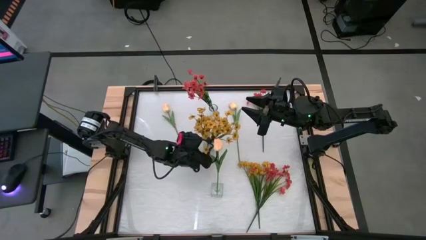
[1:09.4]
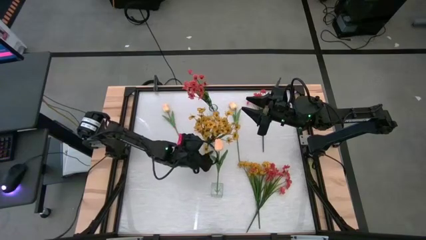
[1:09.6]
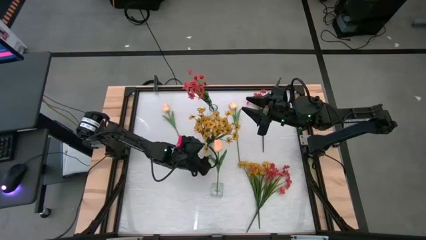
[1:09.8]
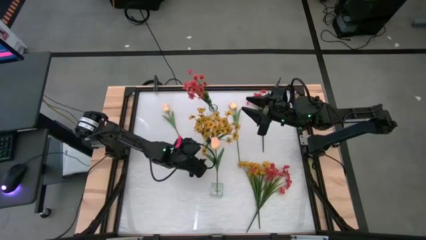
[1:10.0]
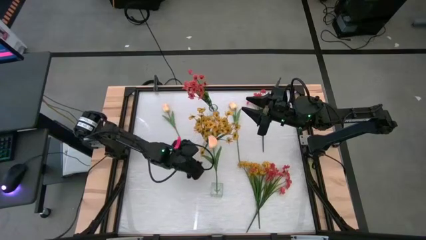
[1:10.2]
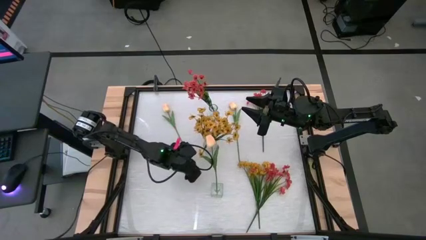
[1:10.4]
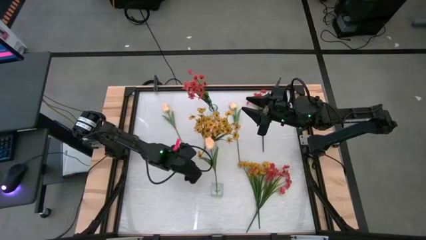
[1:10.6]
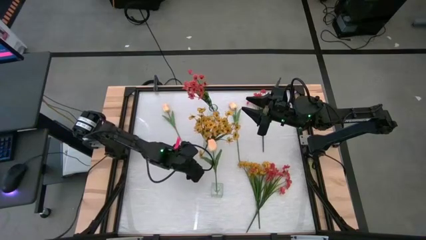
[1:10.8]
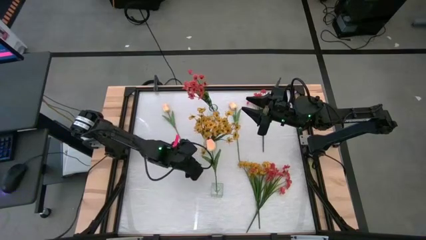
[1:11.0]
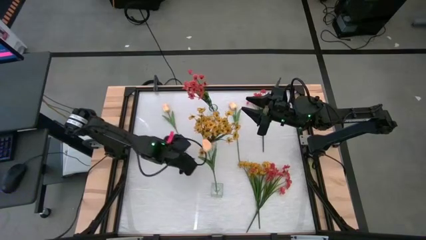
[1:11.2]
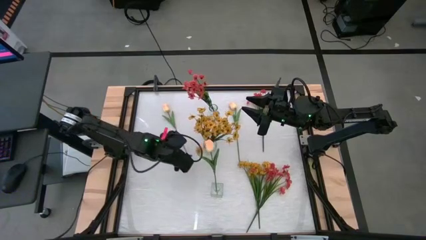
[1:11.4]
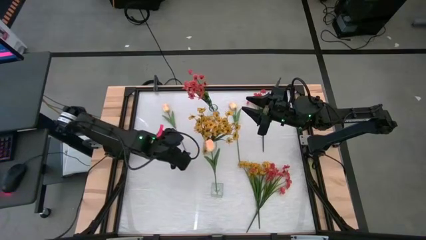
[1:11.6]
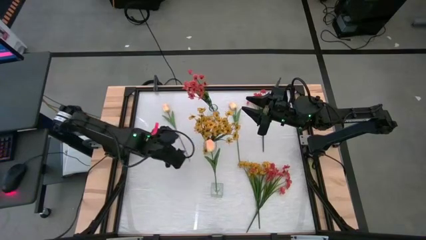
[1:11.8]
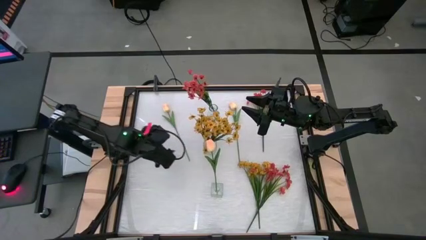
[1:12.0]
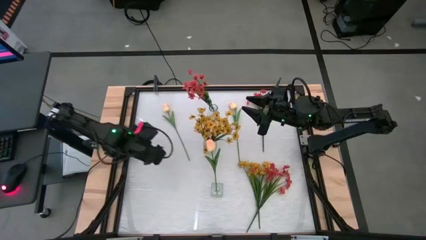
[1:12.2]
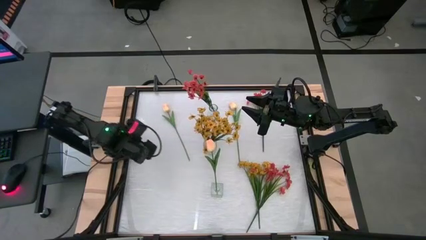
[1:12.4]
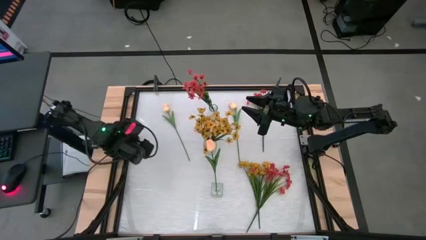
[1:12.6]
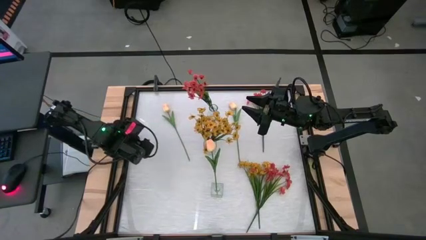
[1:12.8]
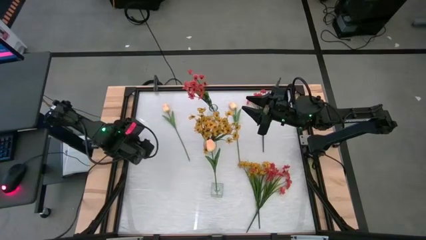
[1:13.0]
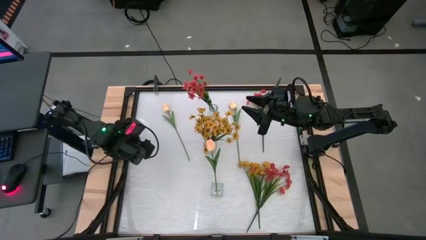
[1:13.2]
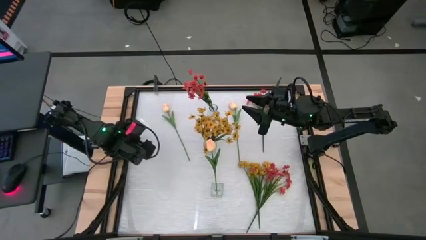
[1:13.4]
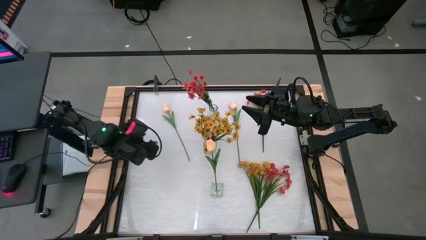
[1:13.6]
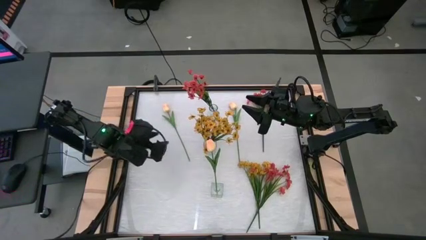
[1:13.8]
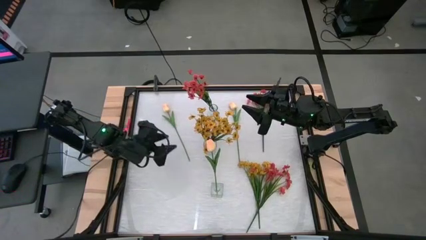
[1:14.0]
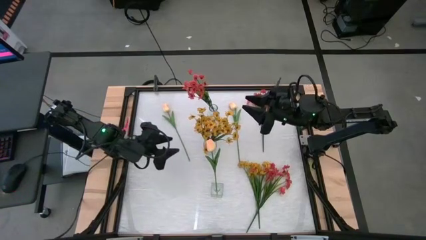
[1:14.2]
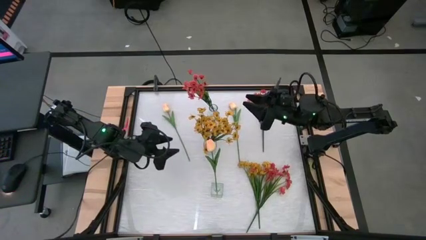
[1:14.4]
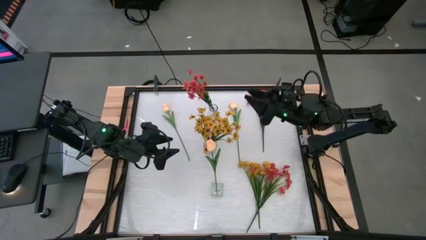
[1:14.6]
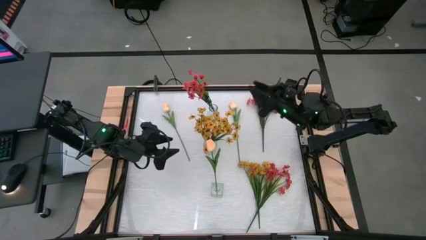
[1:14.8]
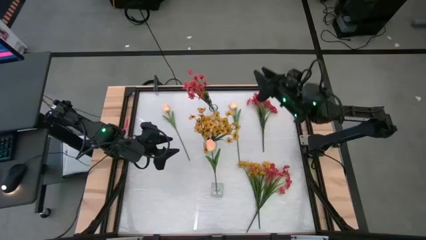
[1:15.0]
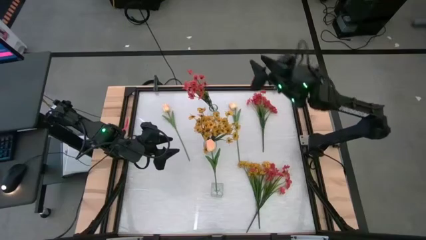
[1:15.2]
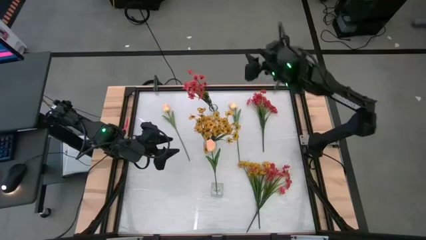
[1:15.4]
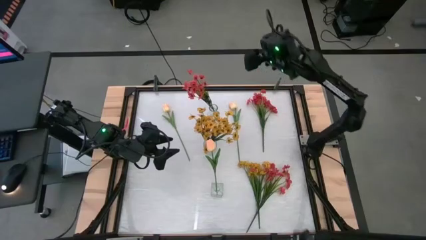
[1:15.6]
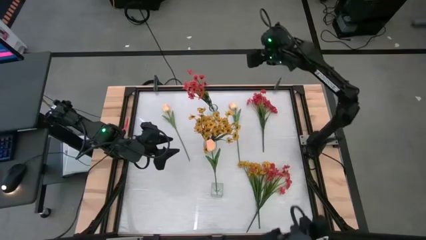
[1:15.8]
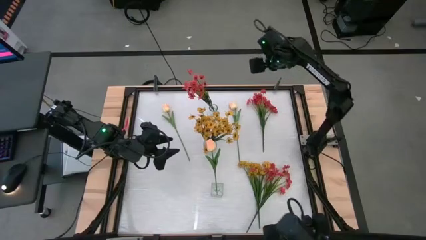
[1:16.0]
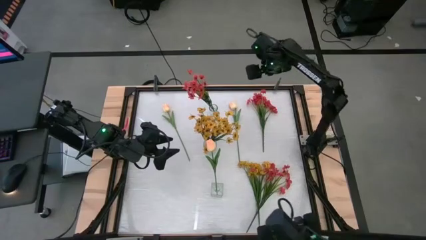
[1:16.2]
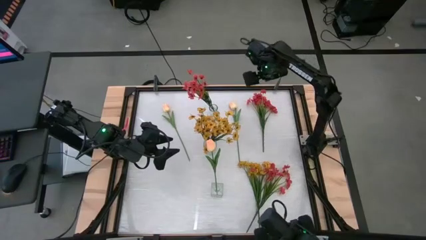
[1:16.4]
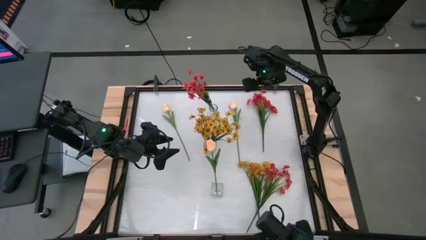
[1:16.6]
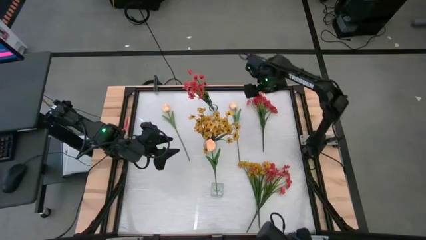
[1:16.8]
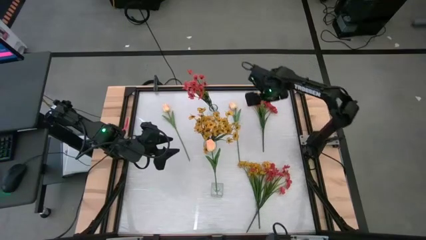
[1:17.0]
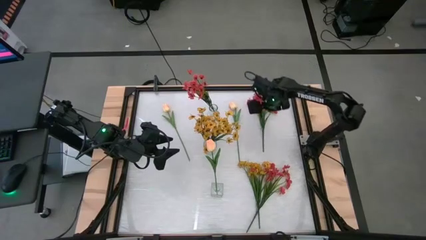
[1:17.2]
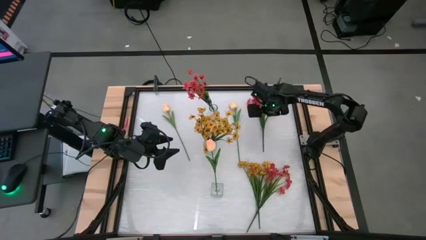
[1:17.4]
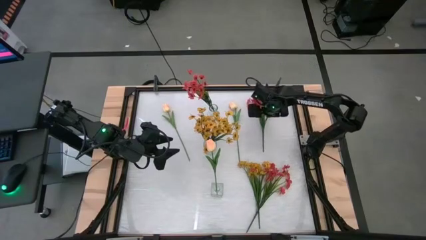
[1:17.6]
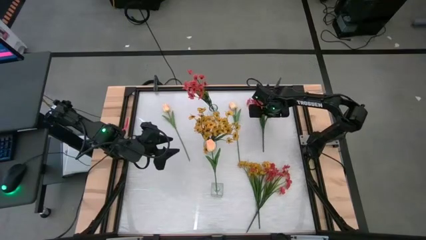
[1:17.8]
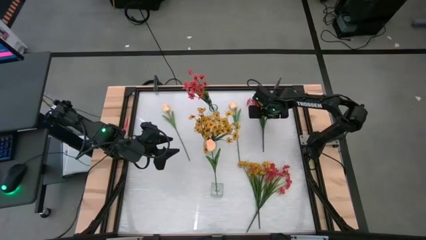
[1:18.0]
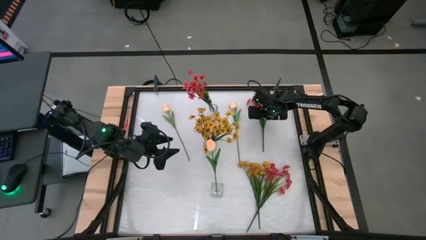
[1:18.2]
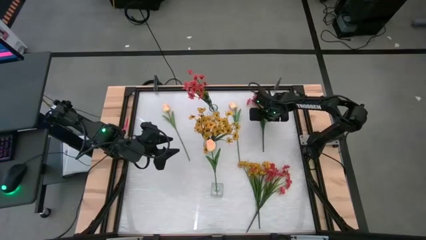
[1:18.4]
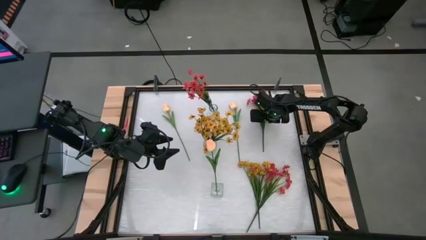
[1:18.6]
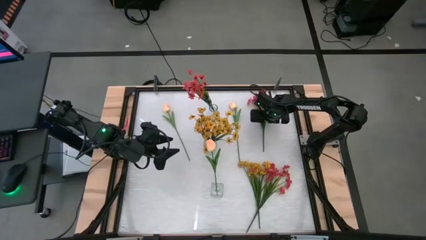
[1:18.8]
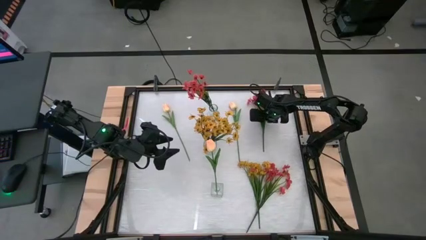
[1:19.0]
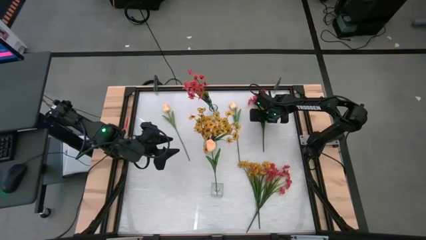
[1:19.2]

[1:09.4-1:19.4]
Task: Sort flowers into vase by color
Put the top red flowers into the top transparent vase

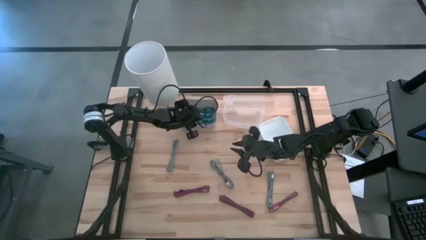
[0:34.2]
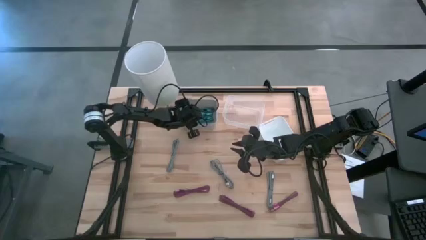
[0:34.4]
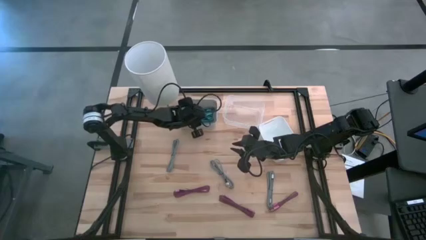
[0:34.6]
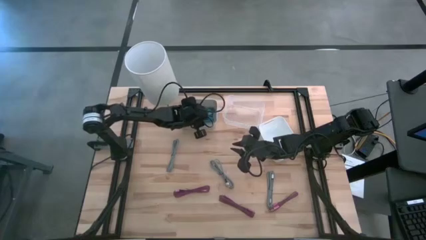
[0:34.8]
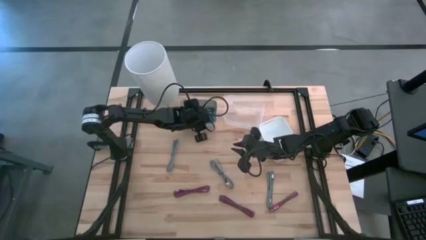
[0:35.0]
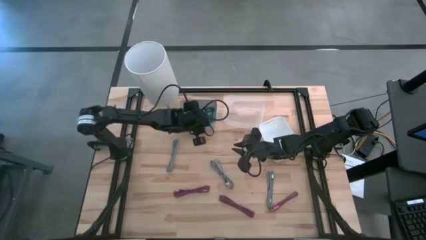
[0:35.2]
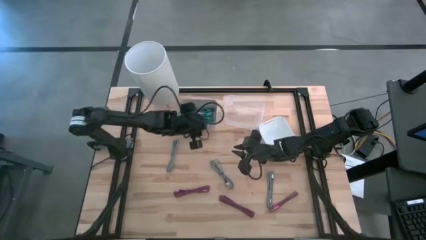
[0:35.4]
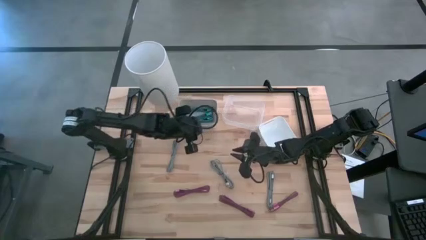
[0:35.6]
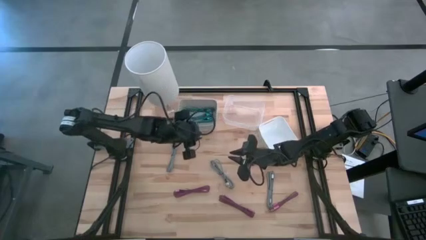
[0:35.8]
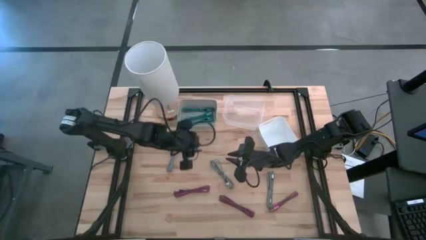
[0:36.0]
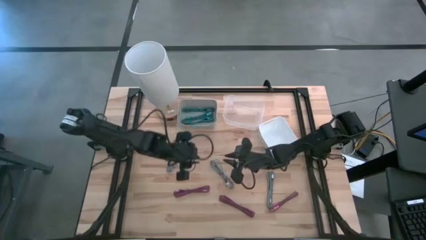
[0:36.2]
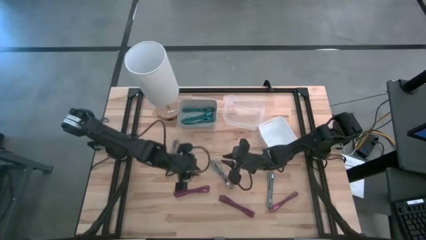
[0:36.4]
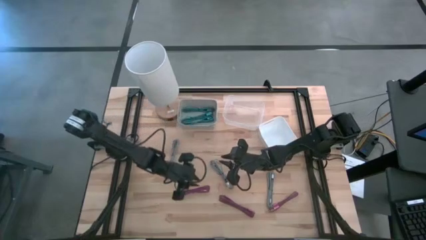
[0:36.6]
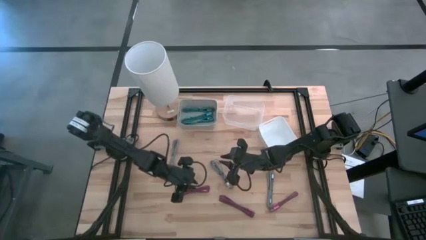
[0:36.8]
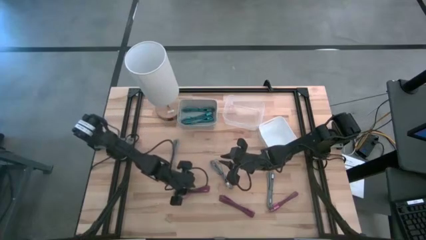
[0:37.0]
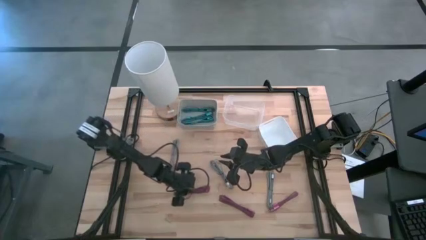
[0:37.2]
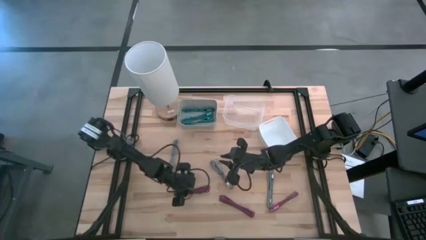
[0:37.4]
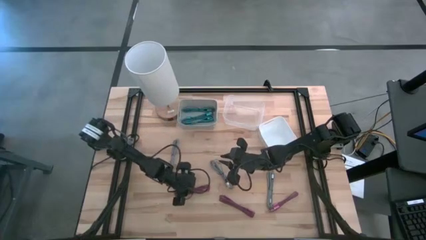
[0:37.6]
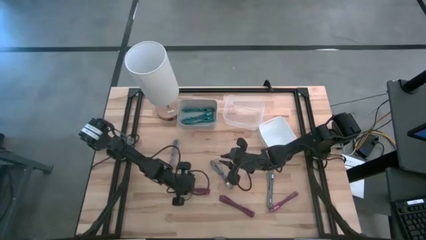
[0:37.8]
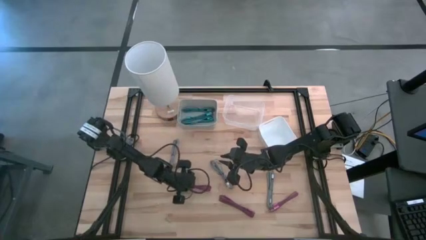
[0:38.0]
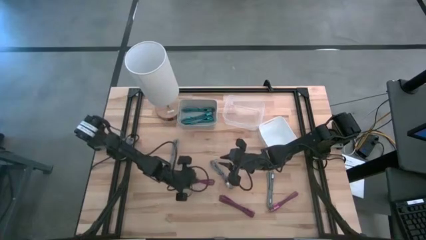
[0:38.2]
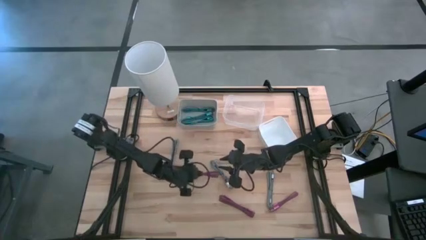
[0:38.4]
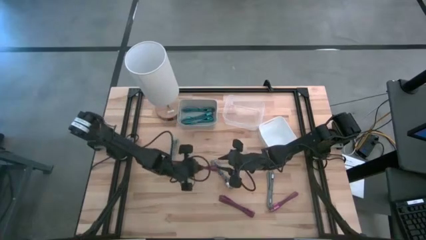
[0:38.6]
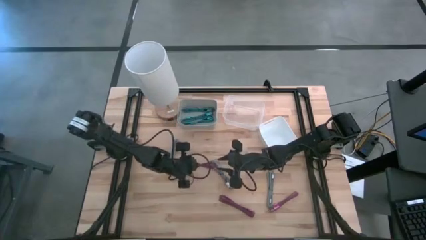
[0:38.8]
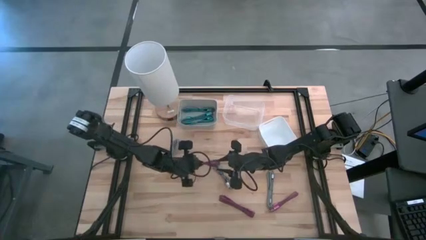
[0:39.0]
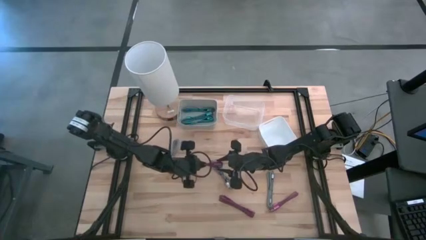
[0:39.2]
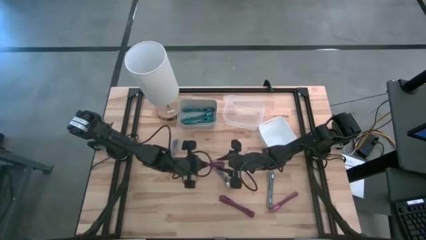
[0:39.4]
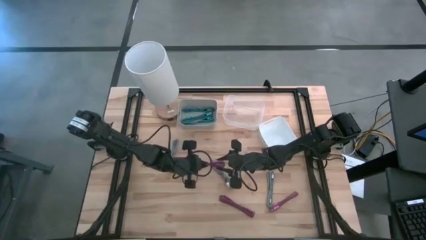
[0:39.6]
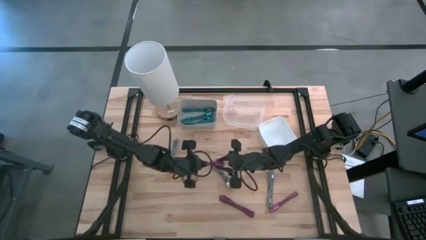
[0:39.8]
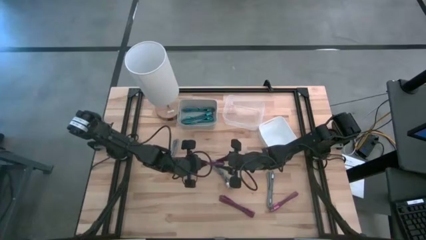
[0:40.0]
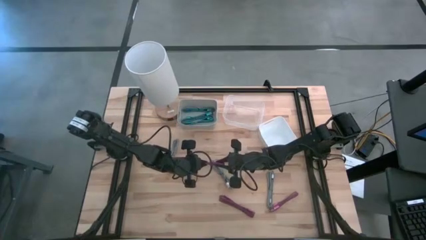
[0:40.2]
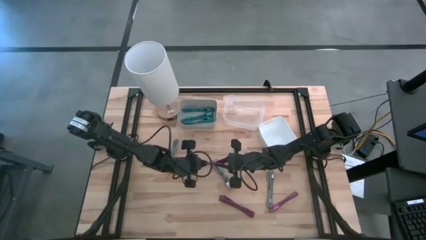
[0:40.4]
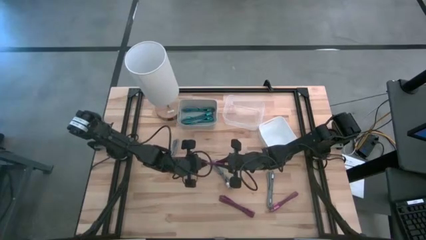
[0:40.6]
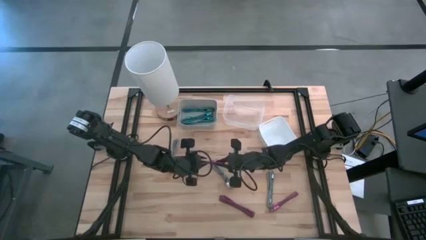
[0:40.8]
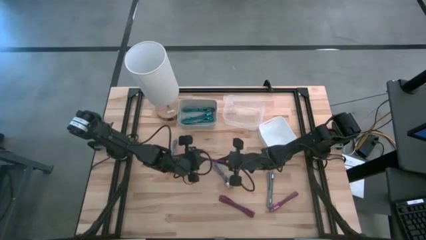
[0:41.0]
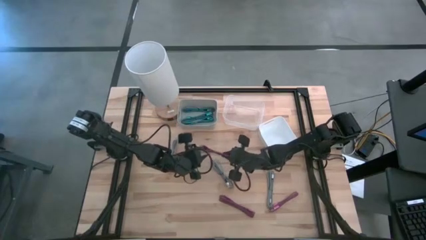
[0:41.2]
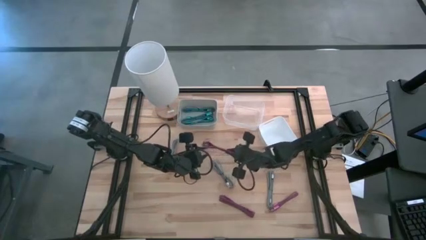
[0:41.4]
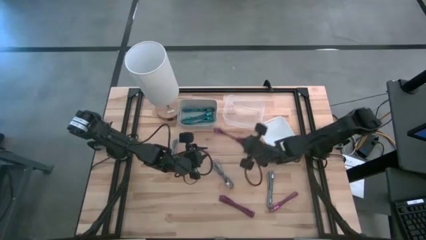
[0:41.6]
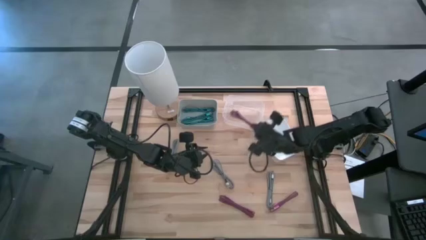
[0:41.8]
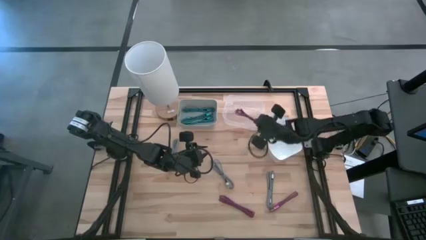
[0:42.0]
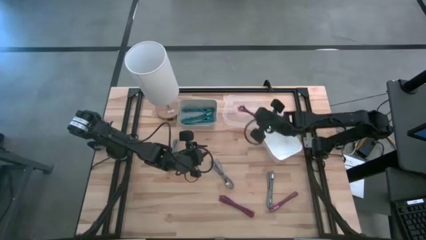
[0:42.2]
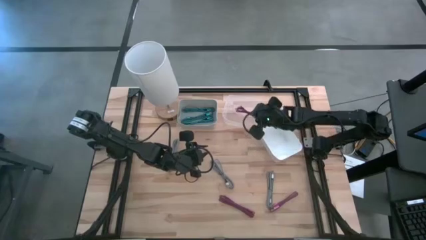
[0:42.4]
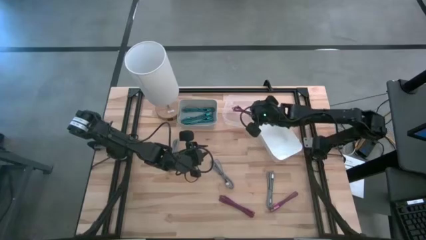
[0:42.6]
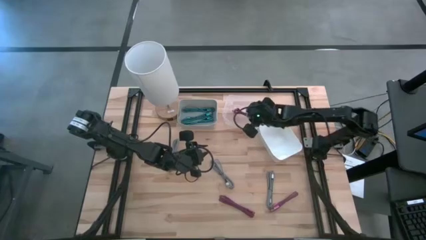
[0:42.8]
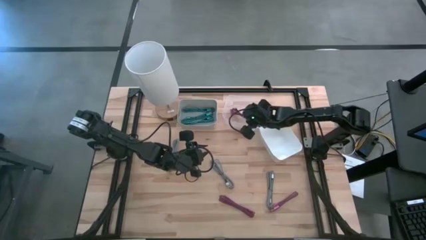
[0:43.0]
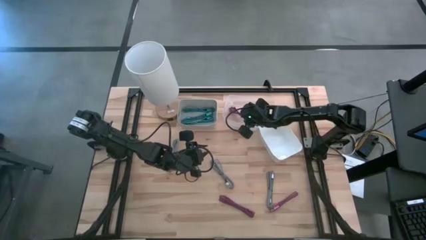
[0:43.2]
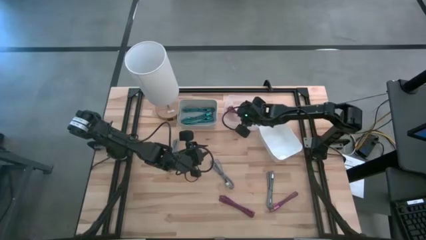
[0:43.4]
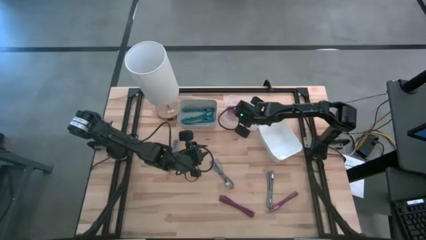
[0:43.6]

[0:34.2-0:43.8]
Task: Pick & Place USB Port
Put the left black and pink USB cable into the transparent bin
